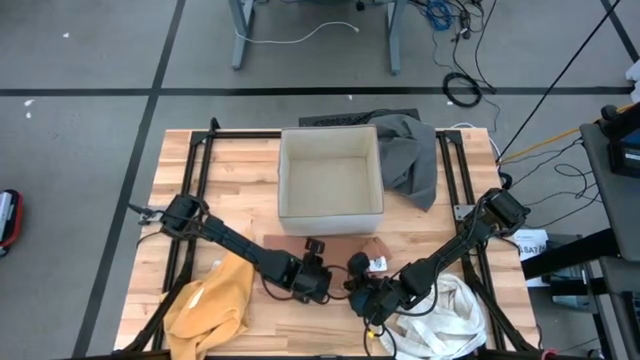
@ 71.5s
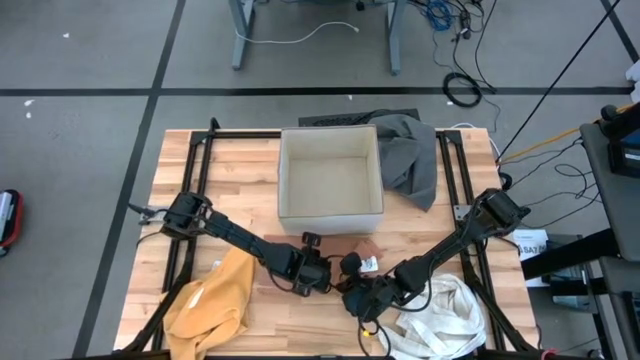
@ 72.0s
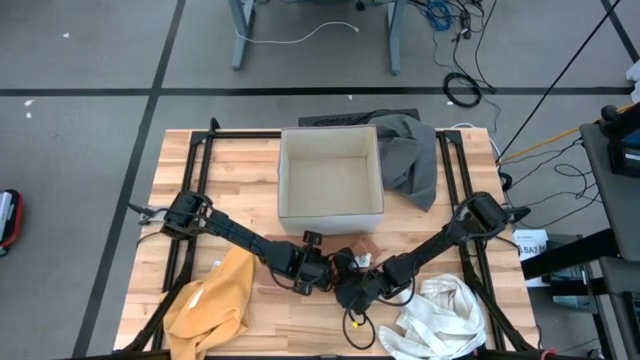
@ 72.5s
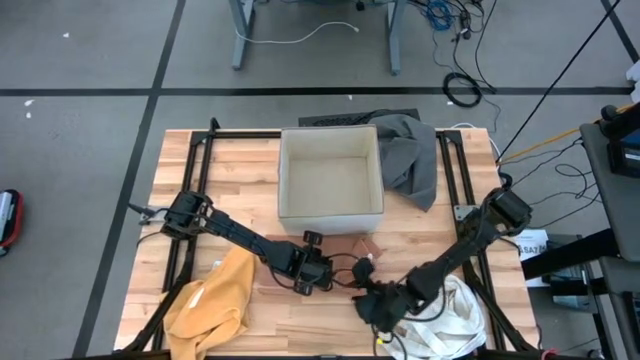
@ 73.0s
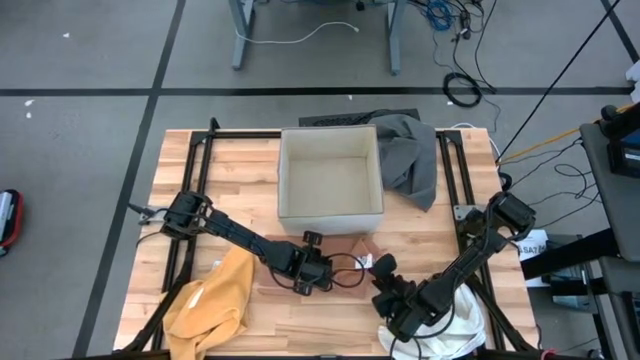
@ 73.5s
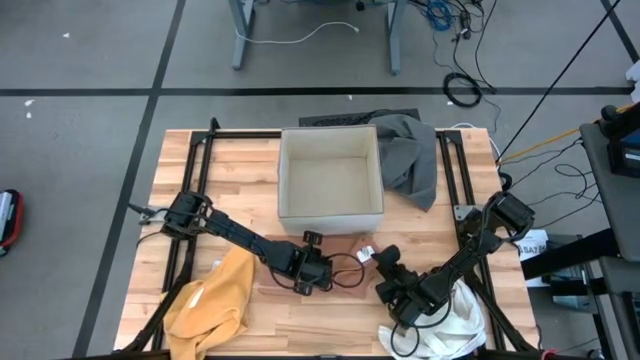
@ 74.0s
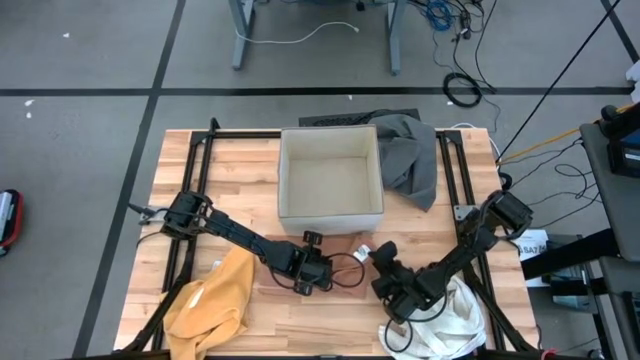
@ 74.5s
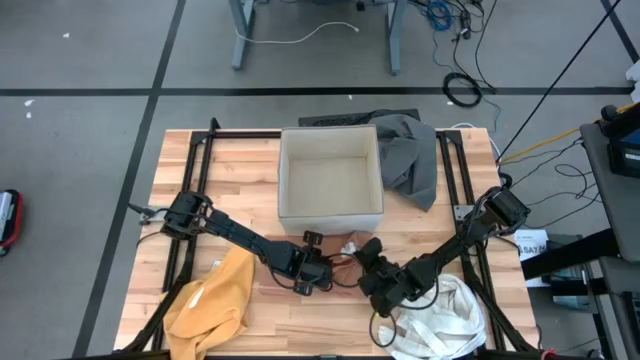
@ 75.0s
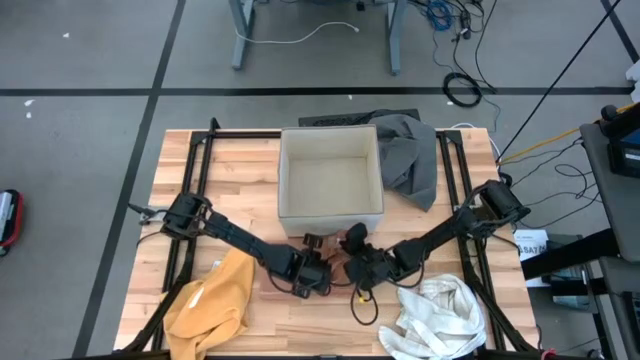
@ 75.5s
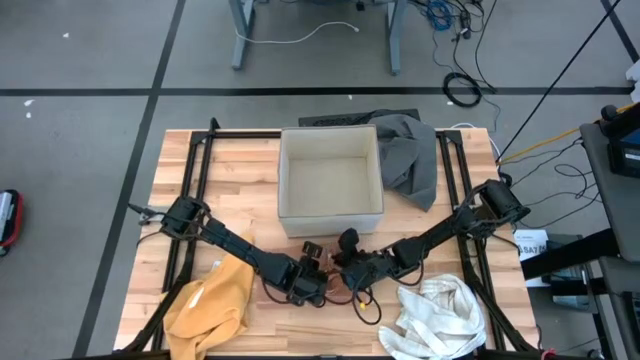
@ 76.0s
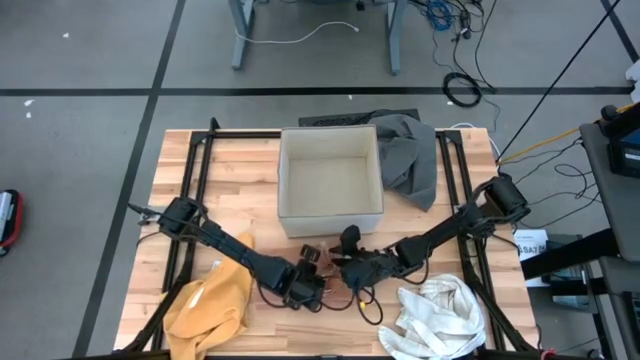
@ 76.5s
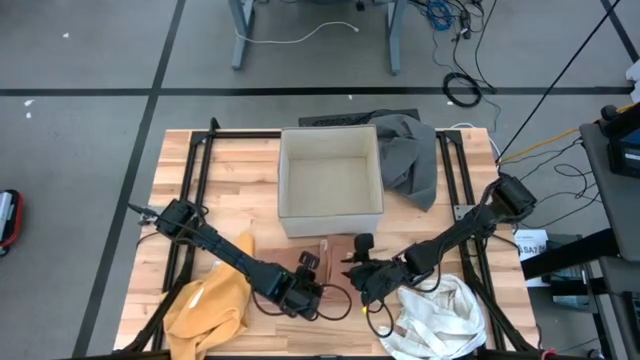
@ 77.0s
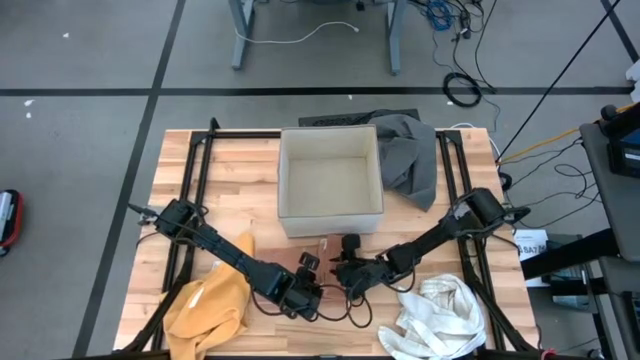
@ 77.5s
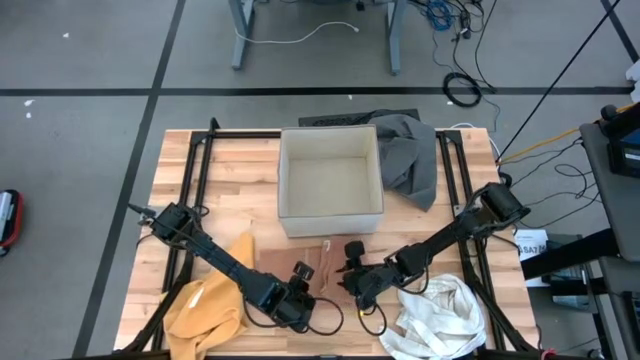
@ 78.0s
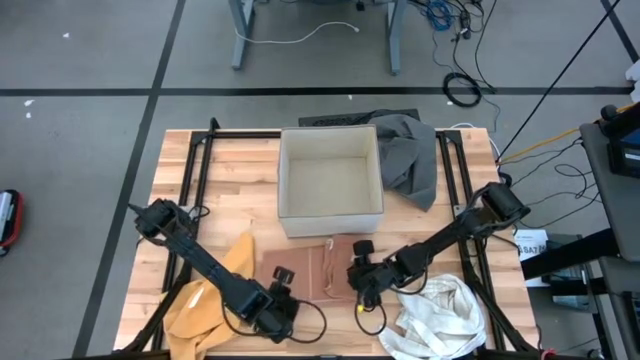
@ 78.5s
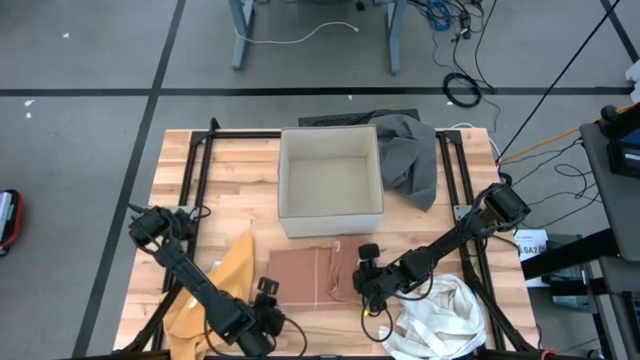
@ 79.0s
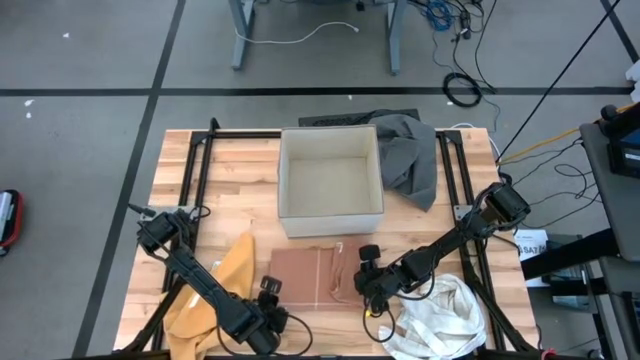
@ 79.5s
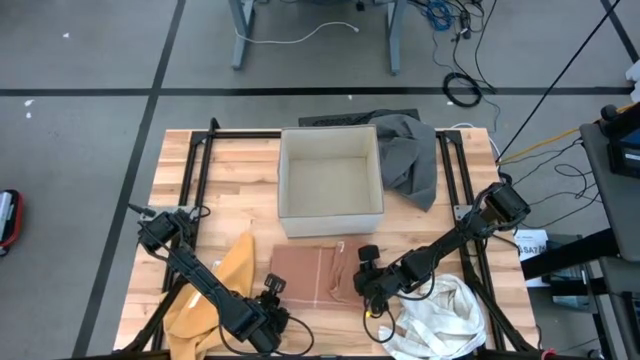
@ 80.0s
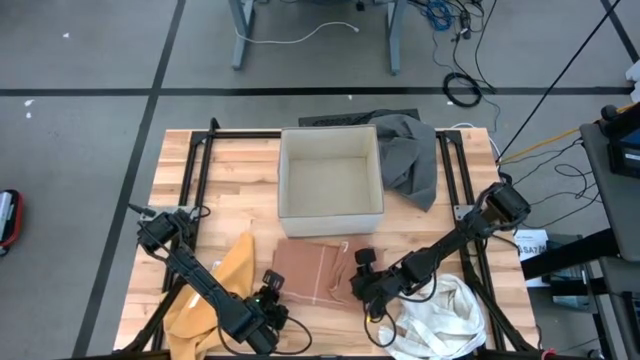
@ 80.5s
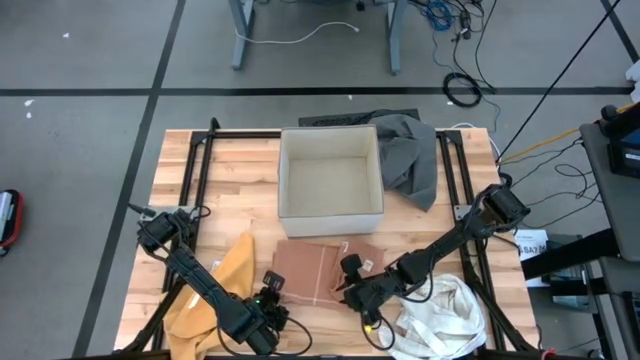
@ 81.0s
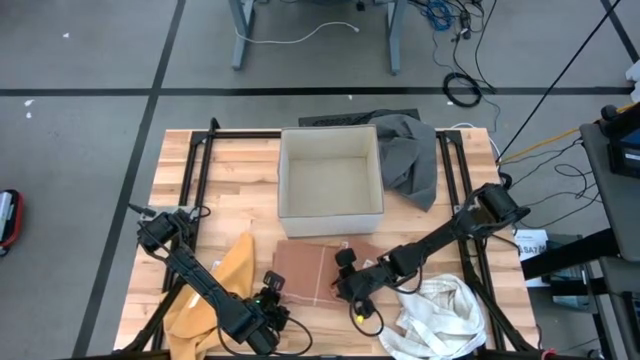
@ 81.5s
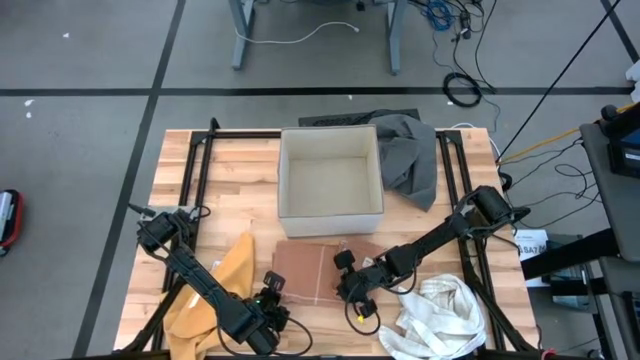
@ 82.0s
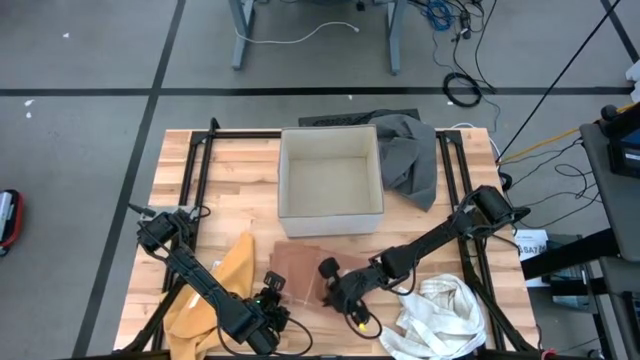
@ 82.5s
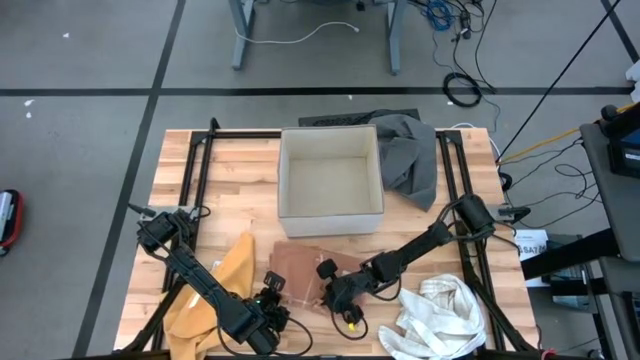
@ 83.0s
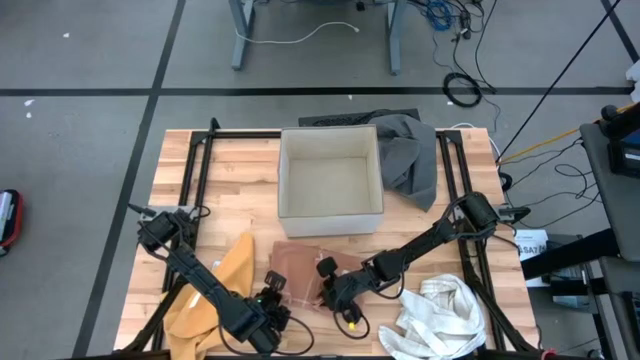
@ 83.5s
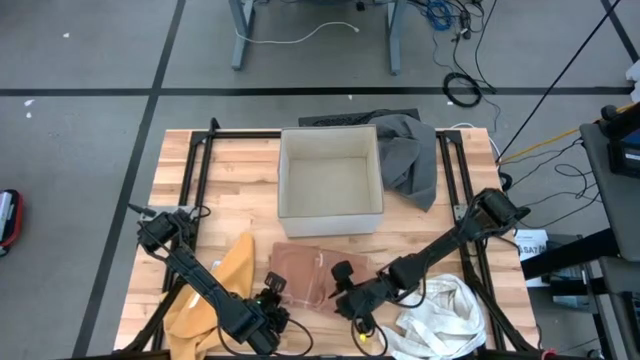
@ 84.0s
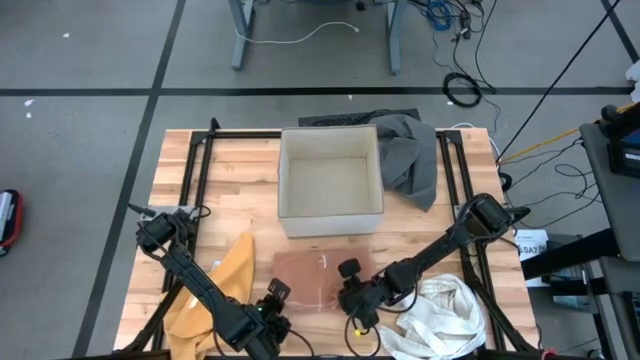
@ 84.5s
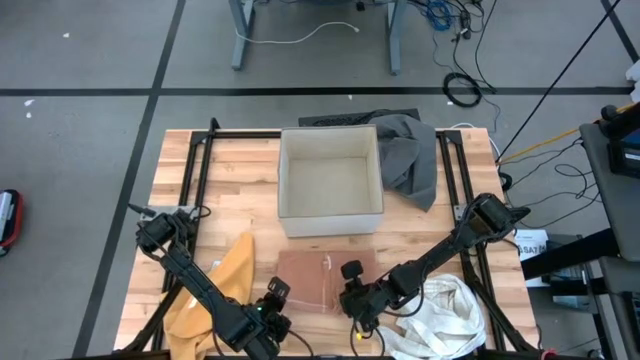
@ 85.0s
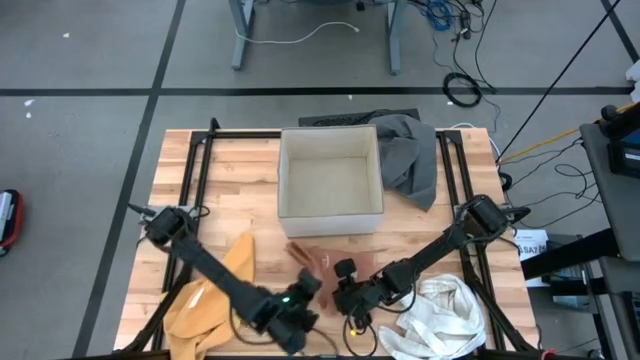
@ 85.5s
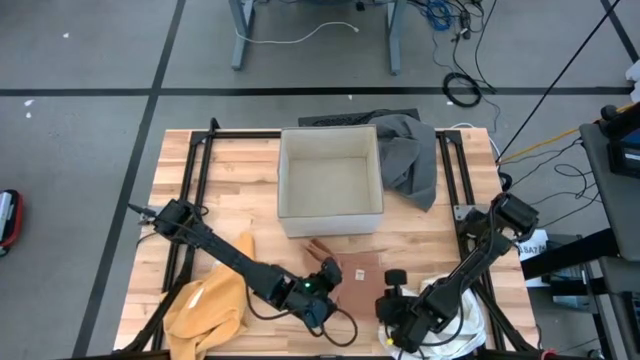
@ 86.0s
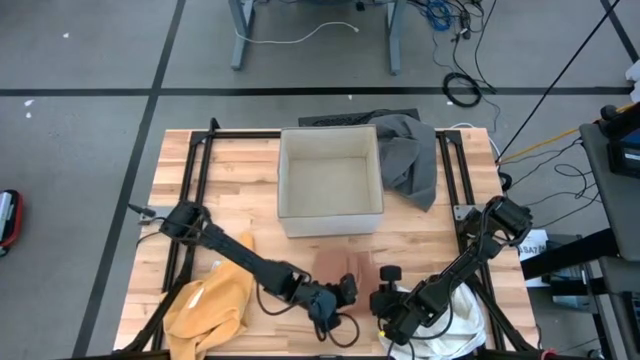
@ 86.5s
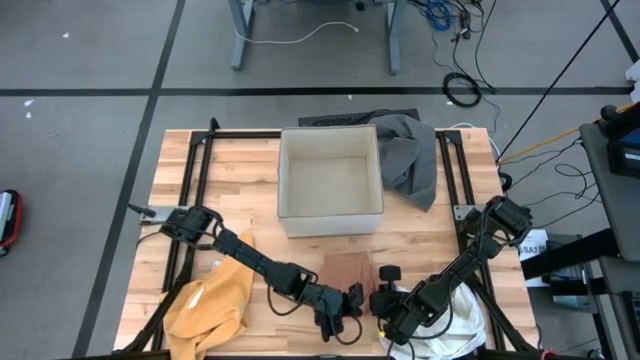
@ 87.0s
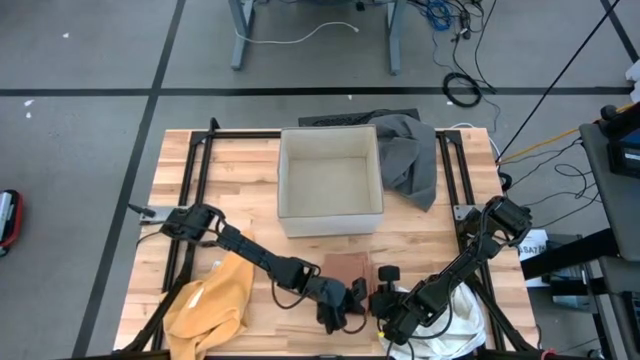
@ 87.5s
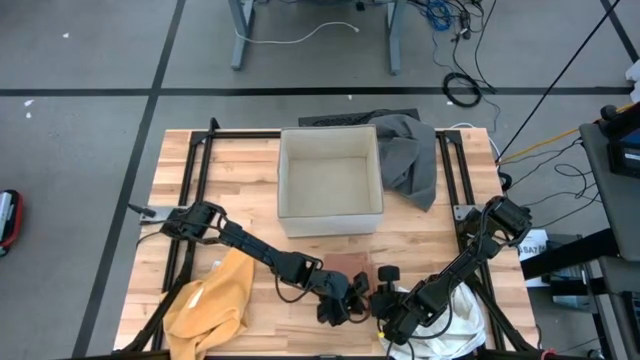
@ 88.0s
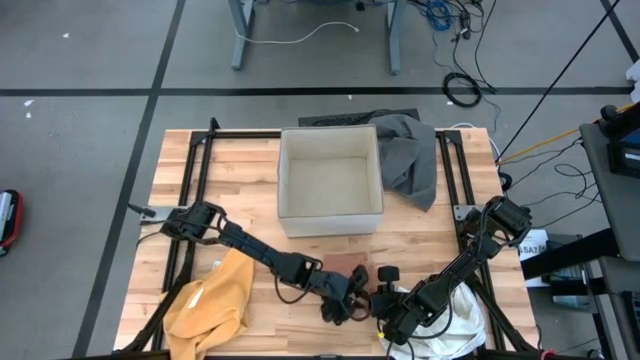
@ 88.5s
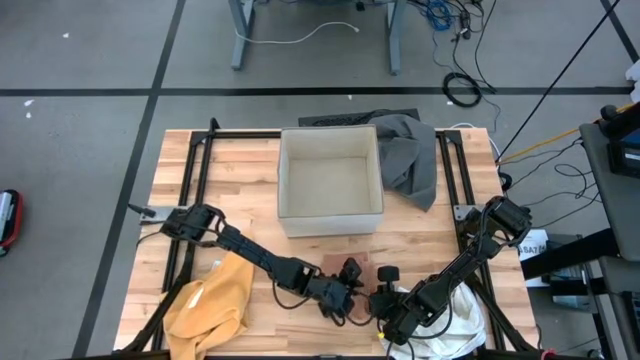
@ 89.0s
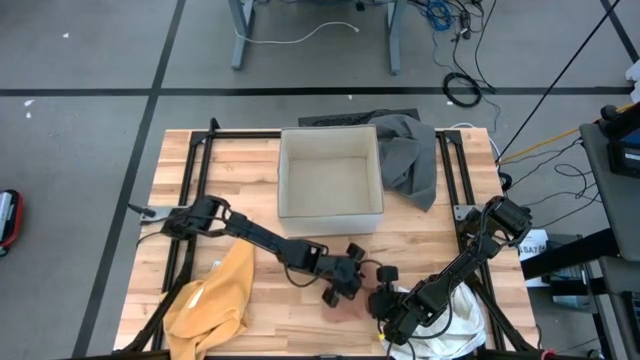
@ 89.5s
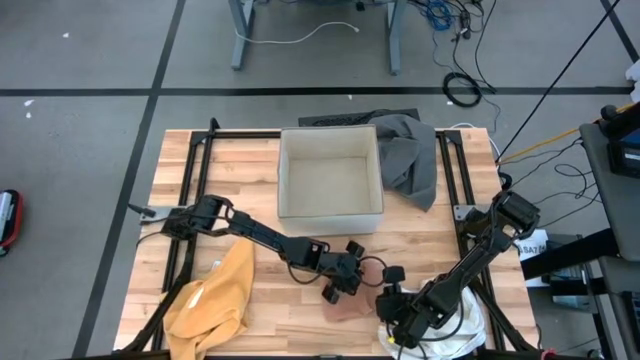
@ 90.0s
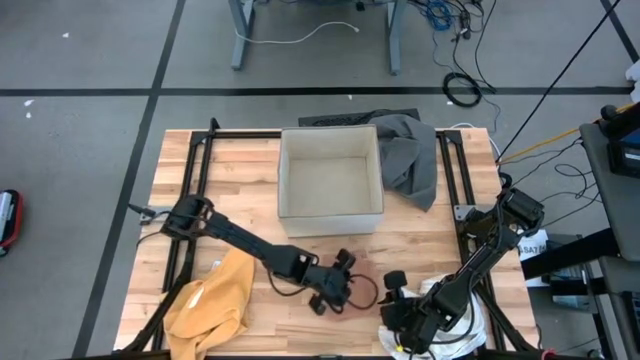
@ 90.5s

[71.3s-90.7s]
Task: Fold towel
Fold the brown towel
